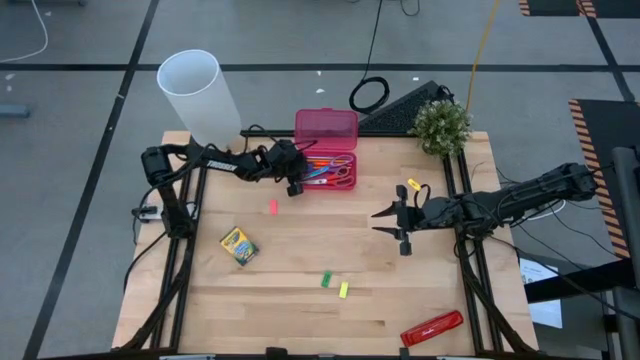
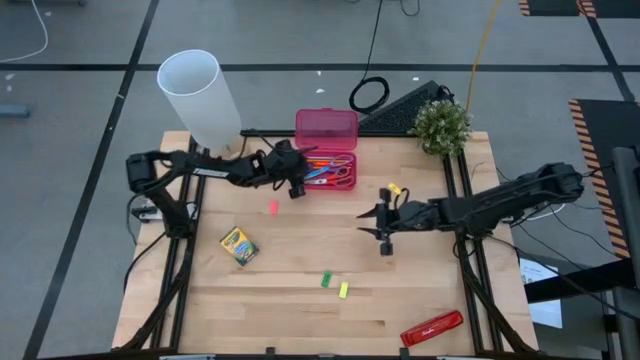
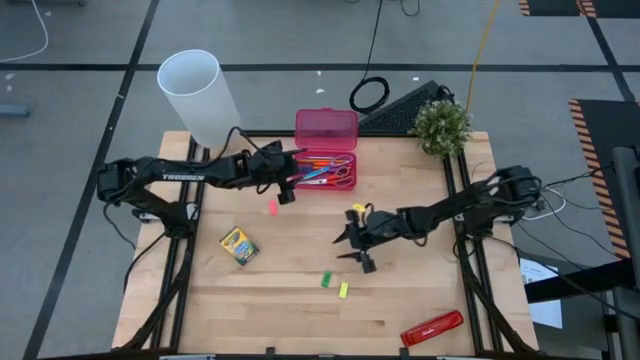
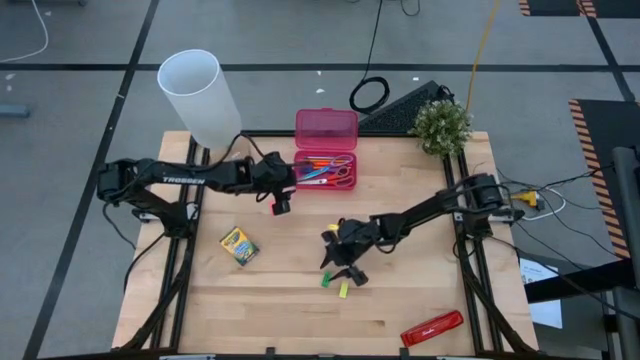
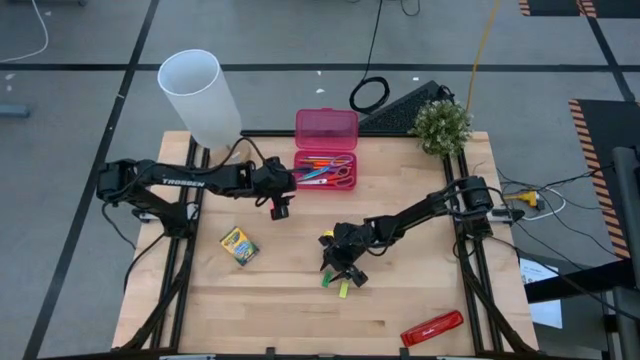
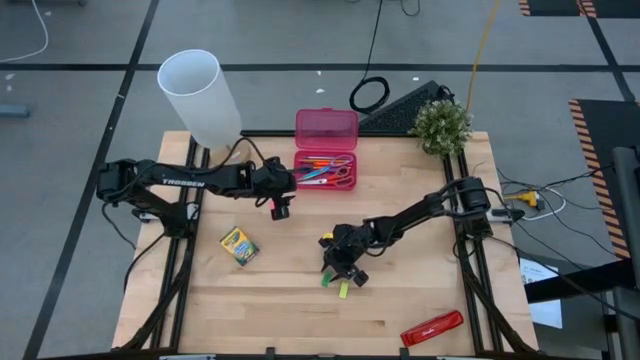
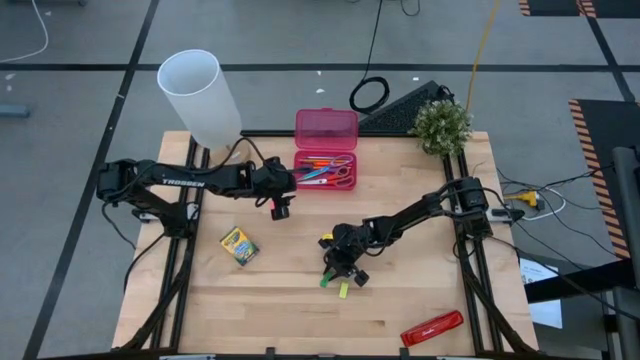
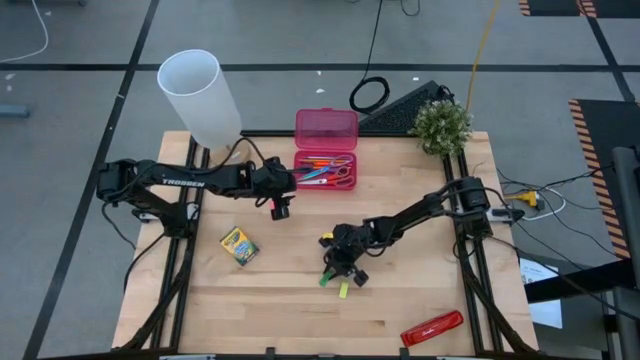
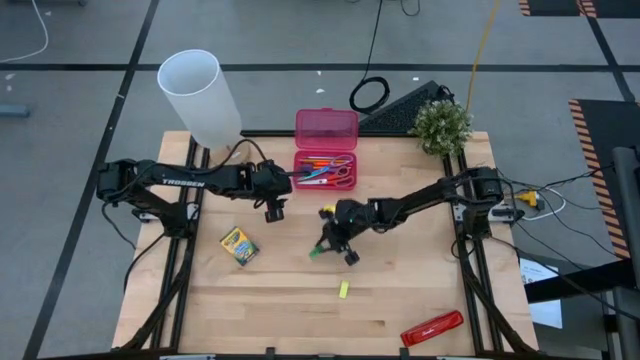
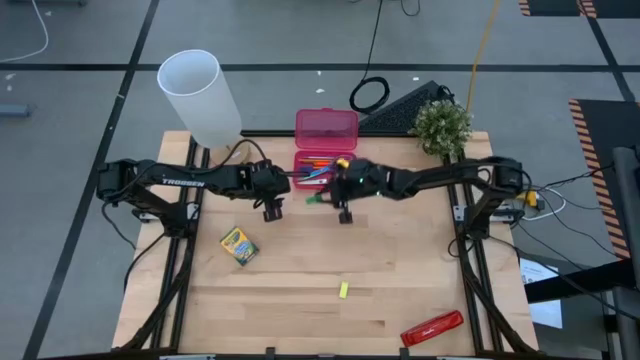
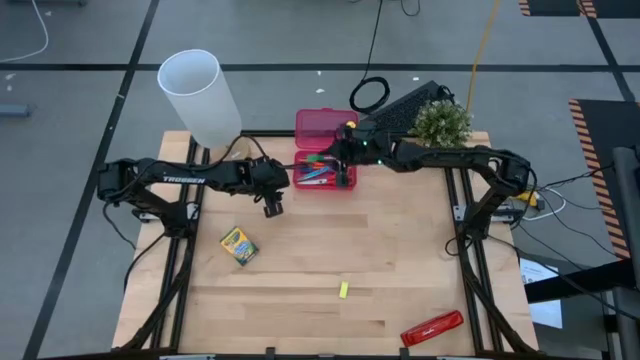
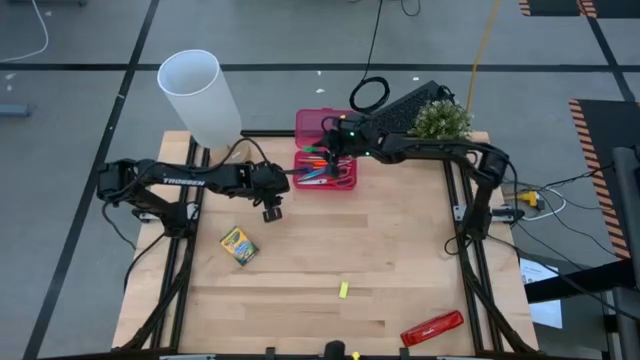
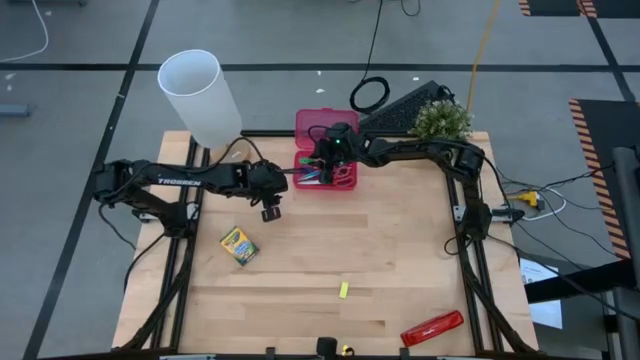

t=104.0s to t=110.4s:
Task: Pack school essentials
Put the green eraser into the red supply box

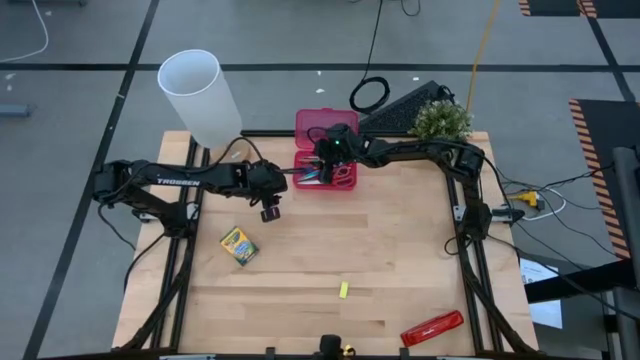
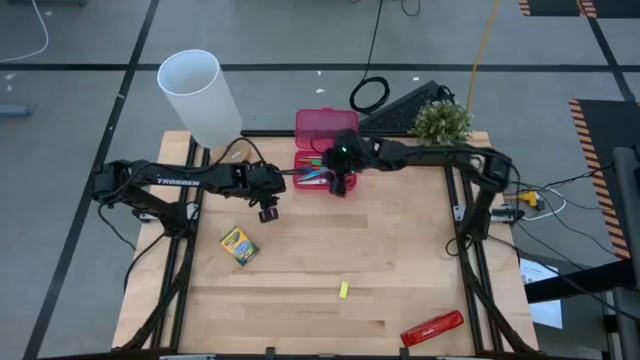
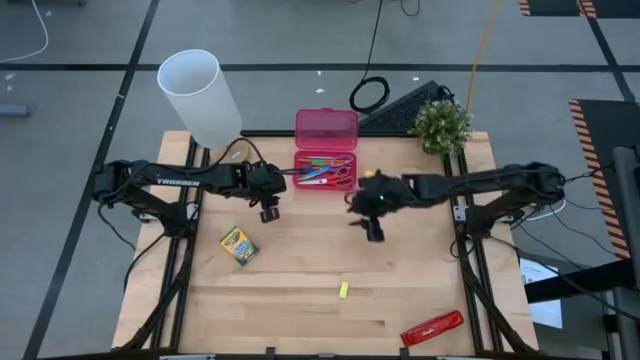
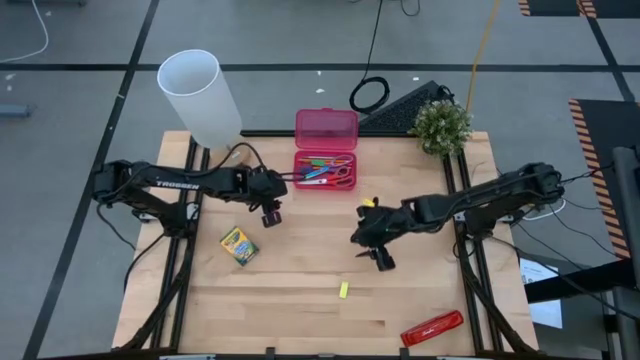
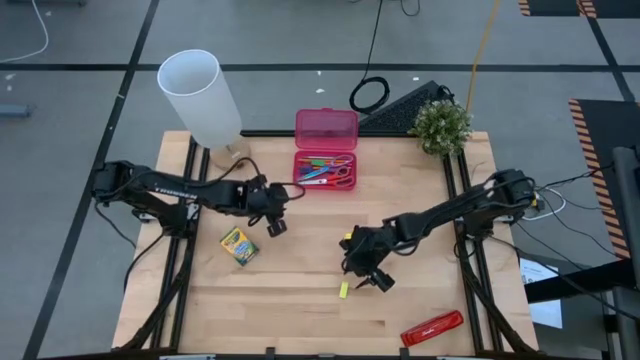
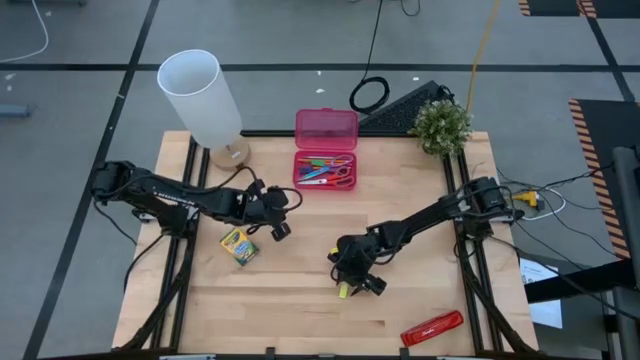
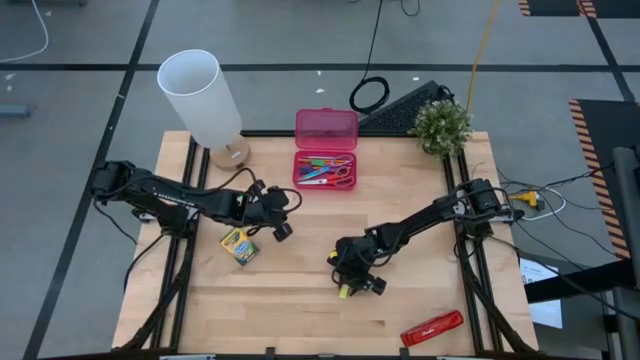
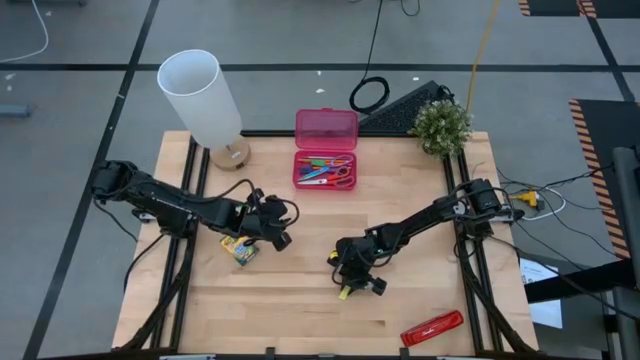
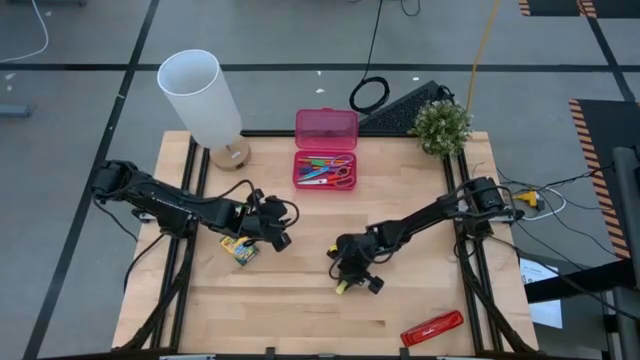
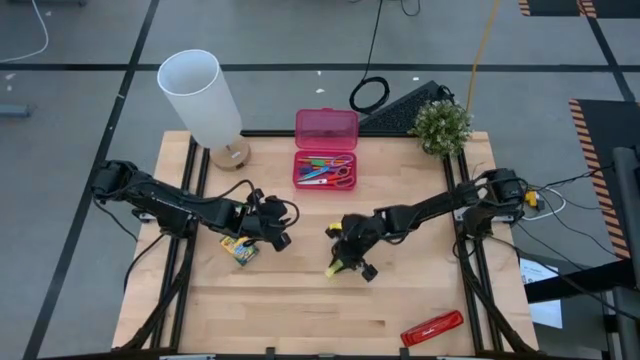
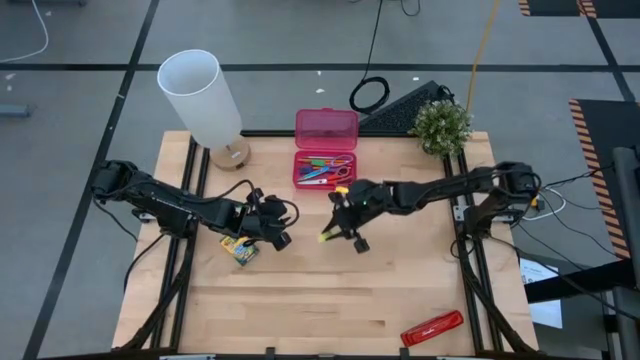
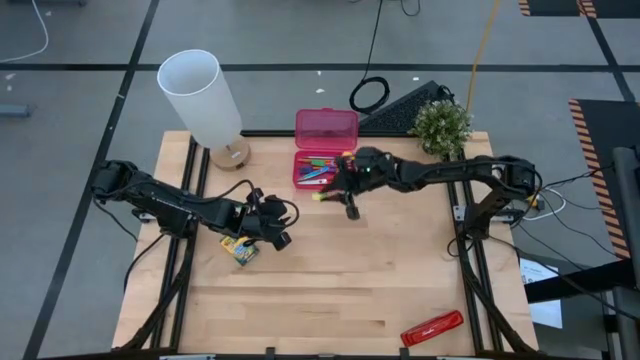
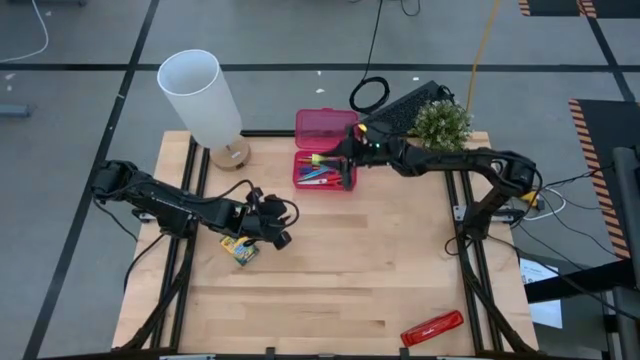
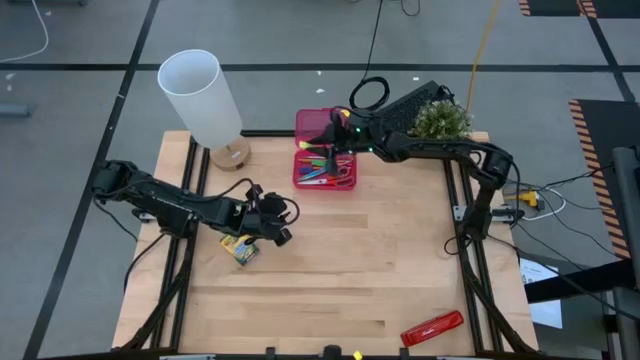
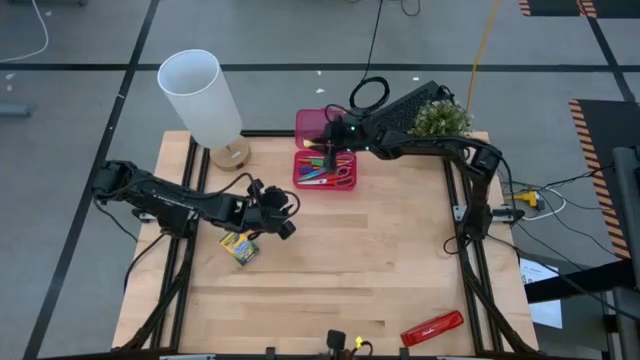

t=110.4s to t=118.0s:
Put the yellow eraser into the red supply box

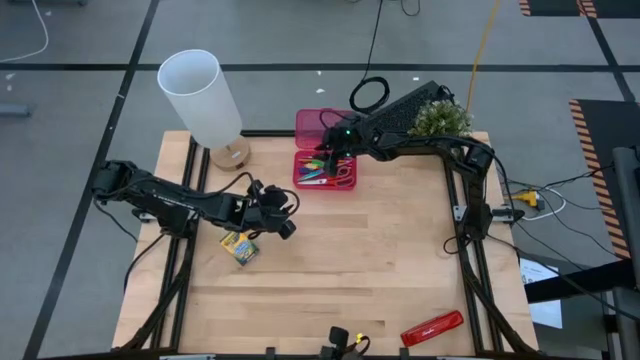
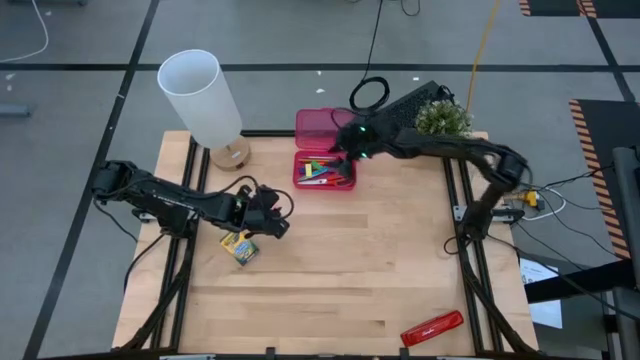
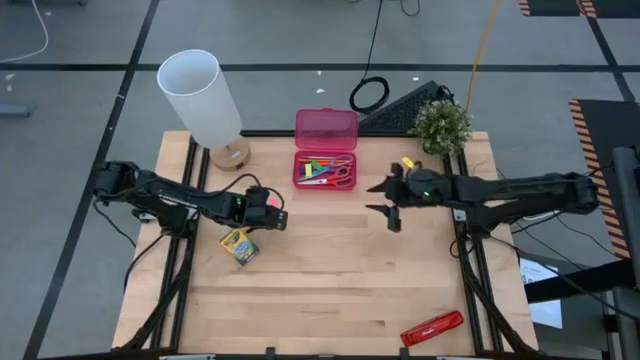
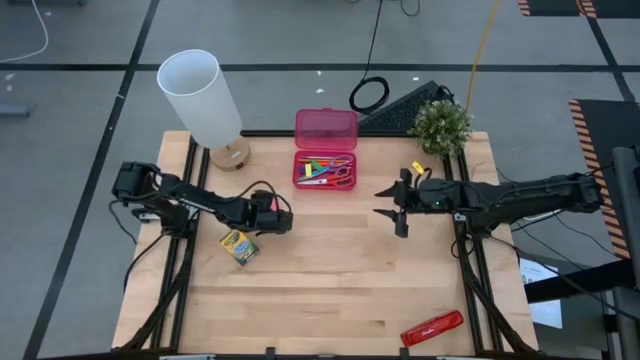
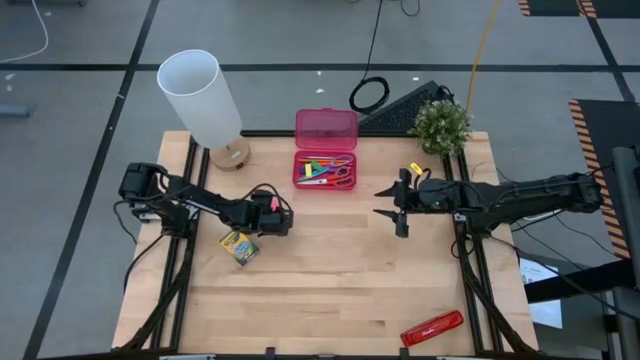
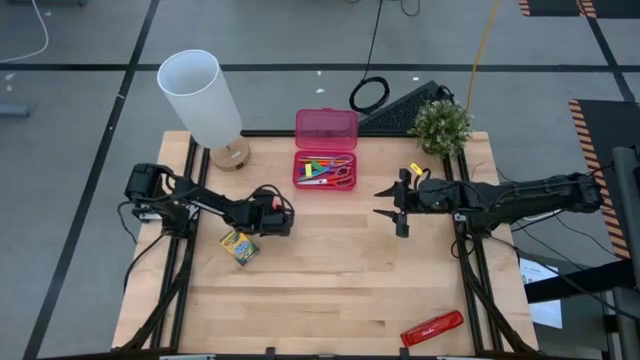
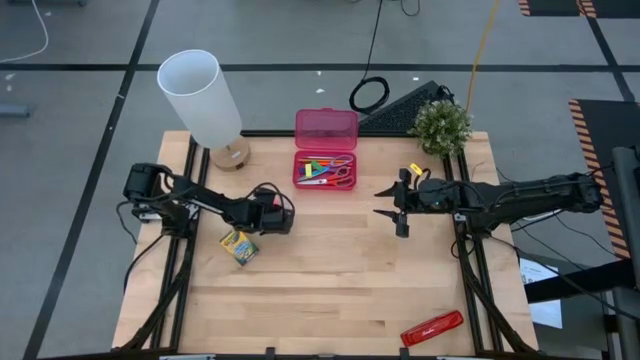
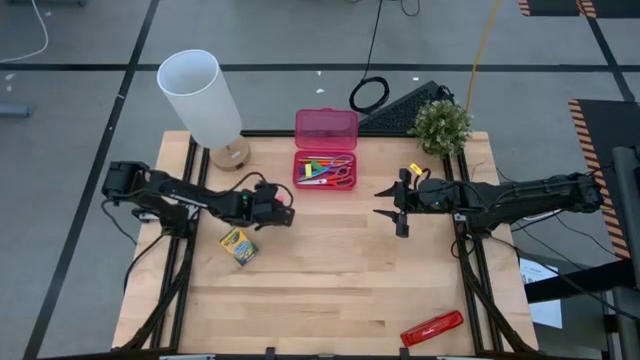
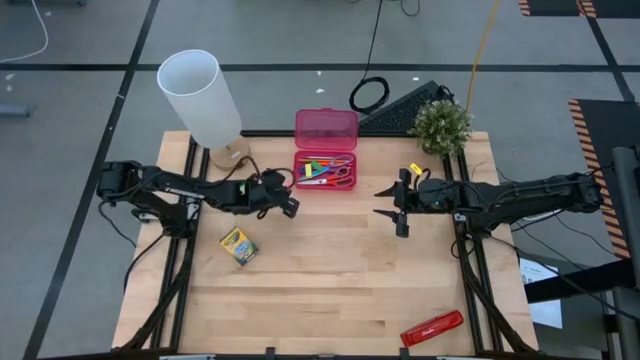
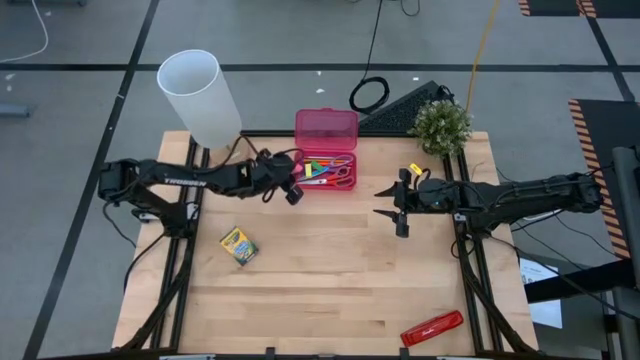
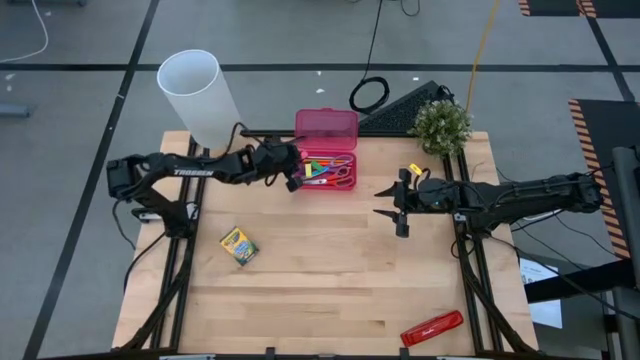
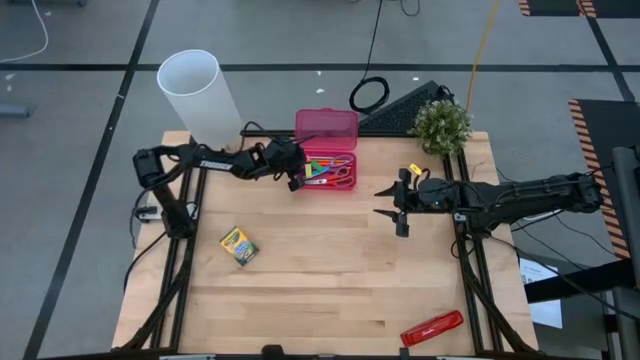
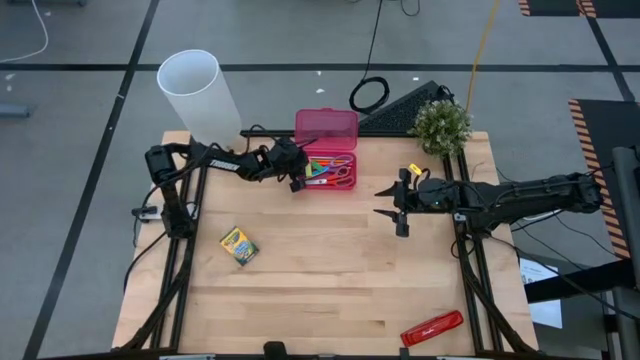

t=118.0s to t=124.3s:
Put the pink eraser into the red supply box
